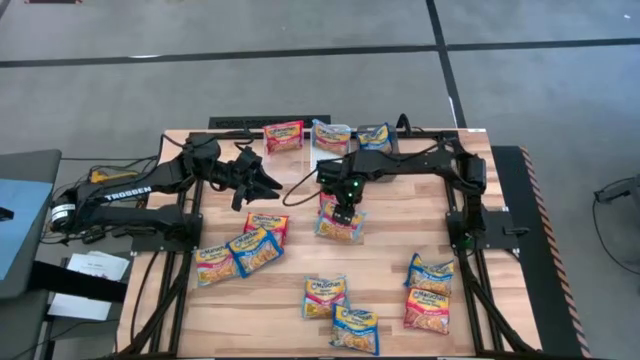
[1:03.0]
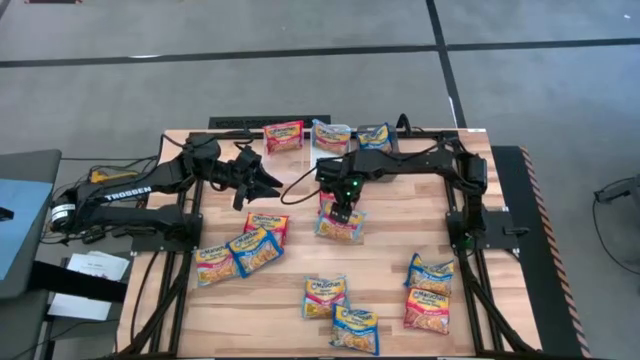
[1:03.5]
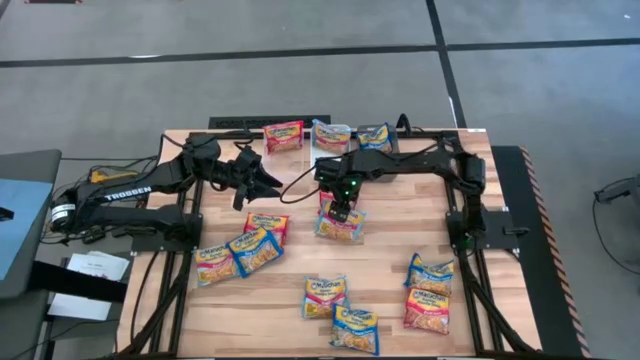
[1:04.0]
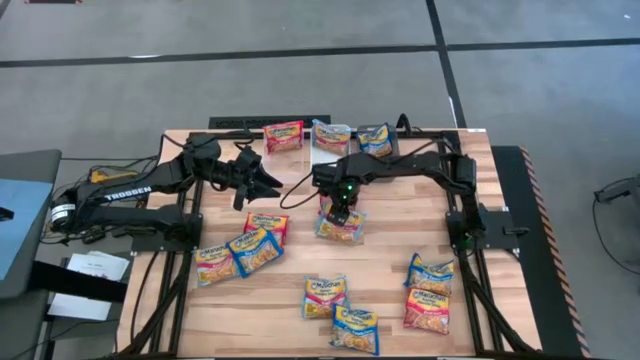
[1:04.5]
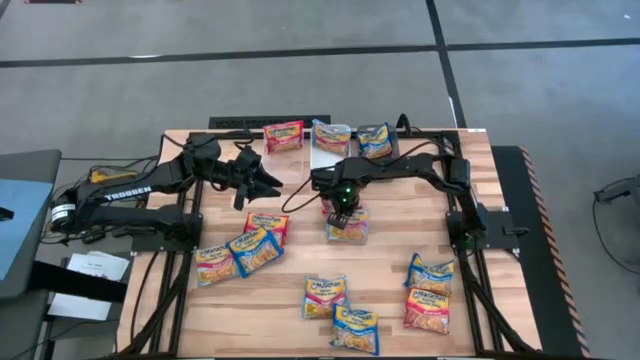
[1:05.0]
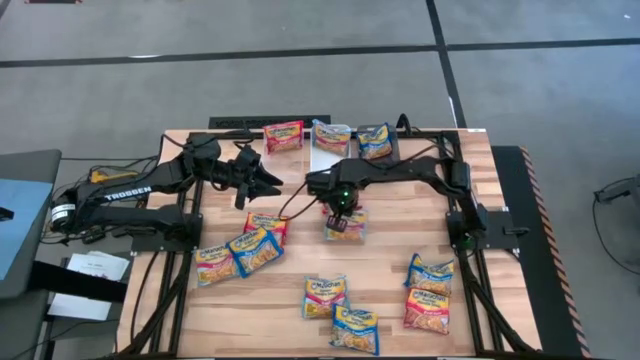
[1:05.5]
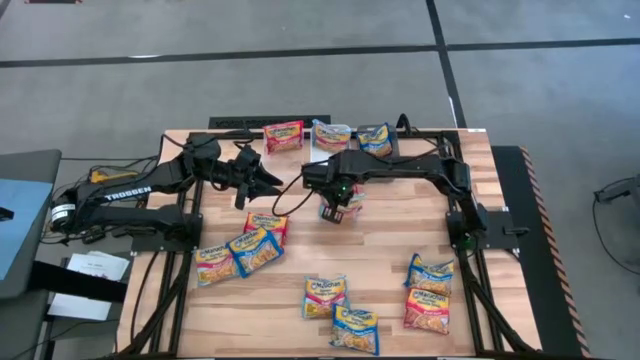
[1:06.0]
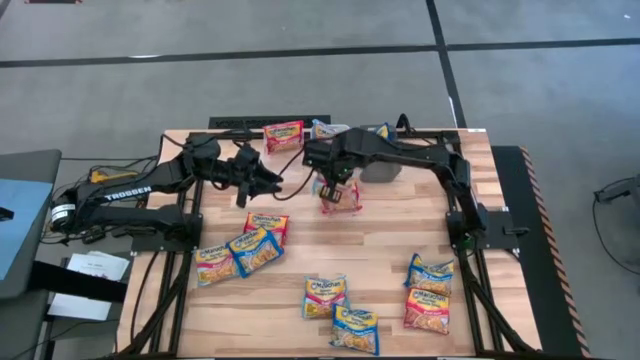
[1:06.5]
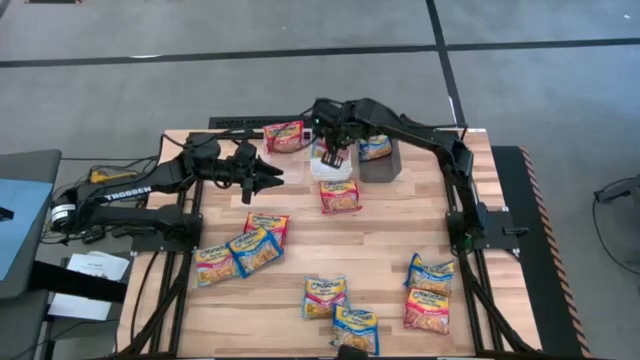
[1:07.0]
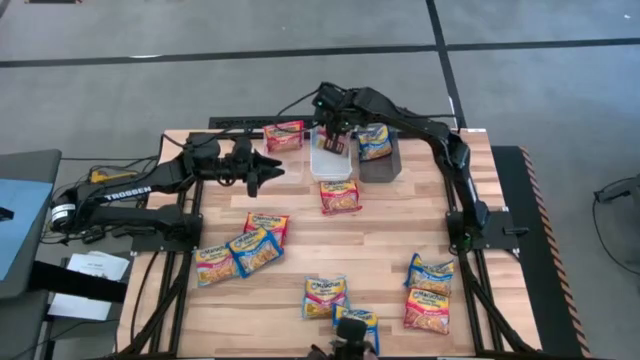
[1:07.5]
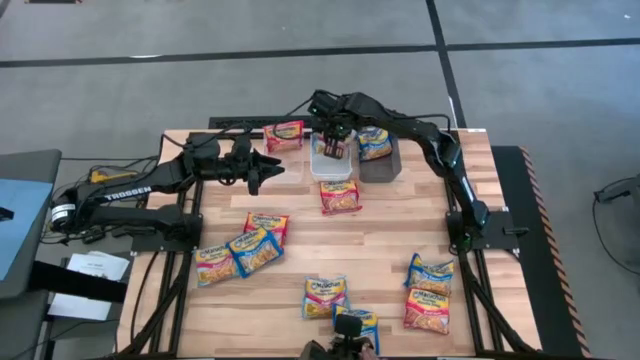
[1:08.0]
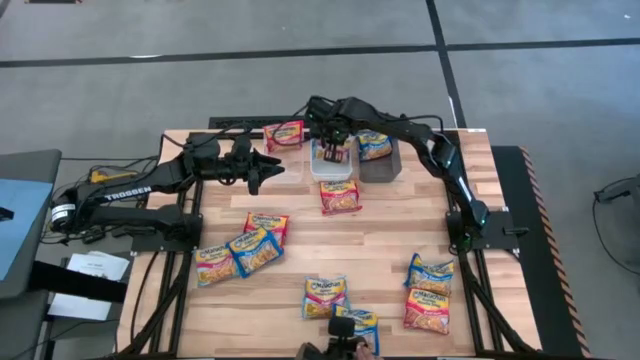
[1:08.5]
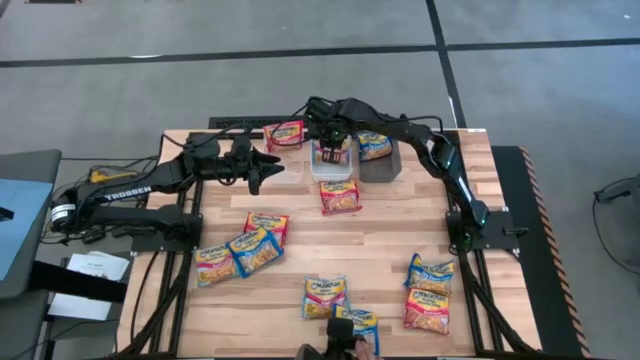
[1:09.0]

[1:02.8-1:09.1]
Task: Sort Maruchan noodles
Put the light blue noodle pack into the white bin

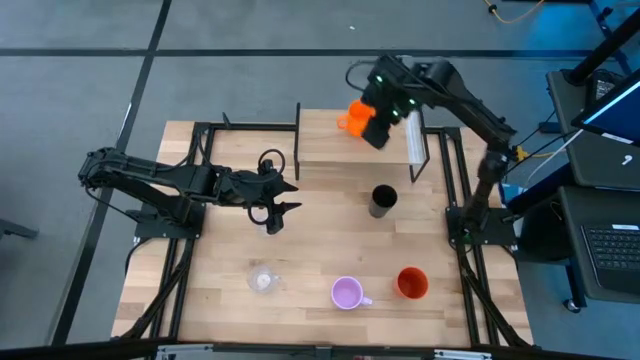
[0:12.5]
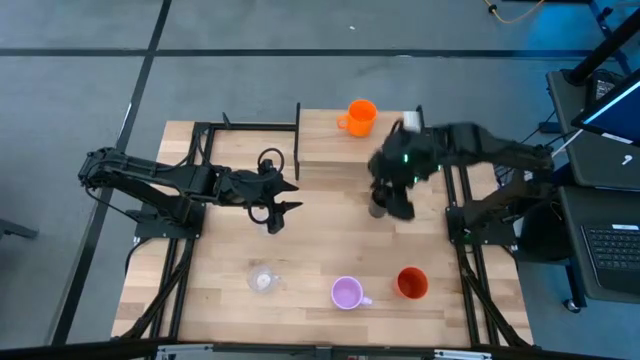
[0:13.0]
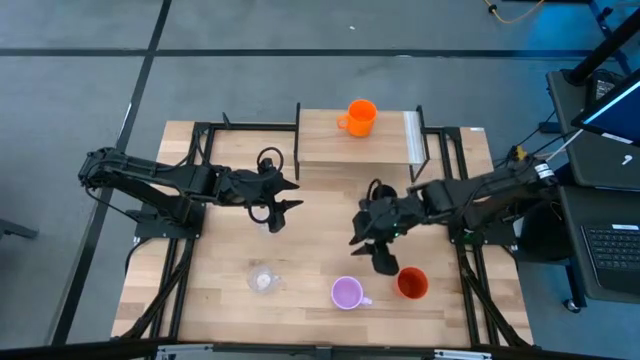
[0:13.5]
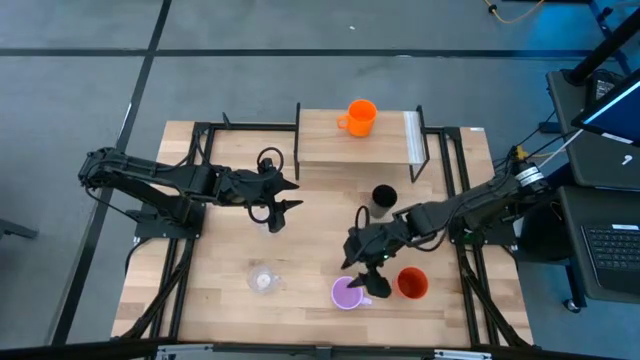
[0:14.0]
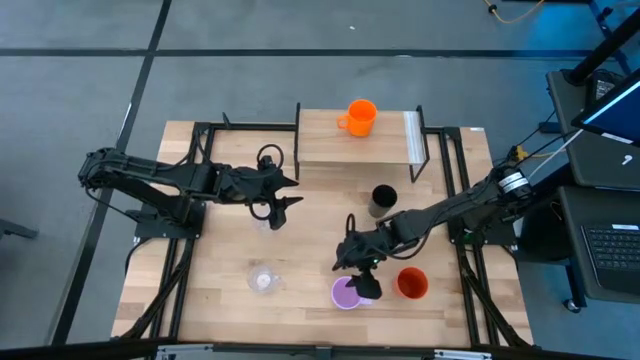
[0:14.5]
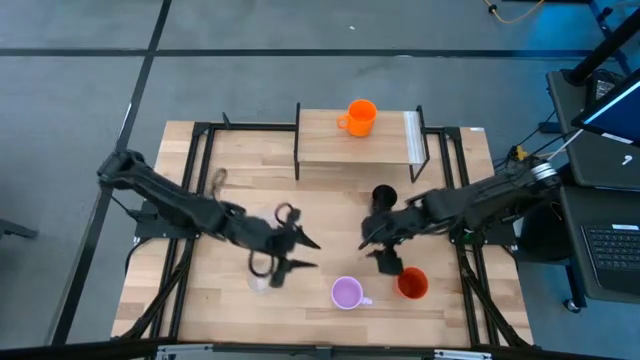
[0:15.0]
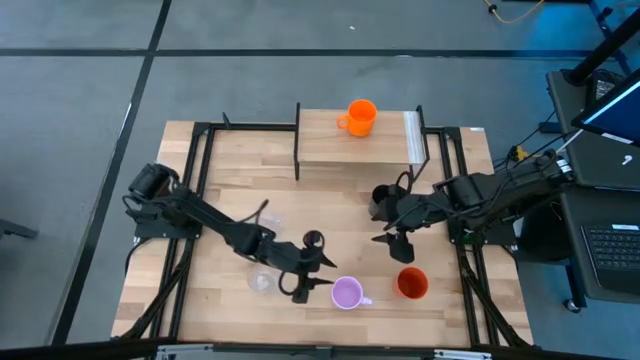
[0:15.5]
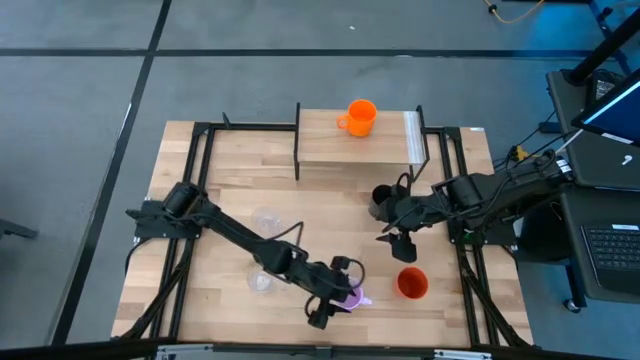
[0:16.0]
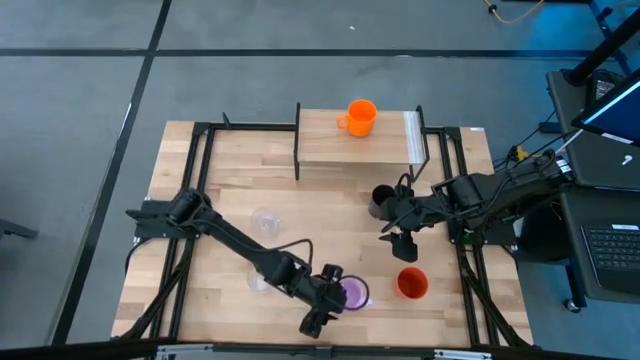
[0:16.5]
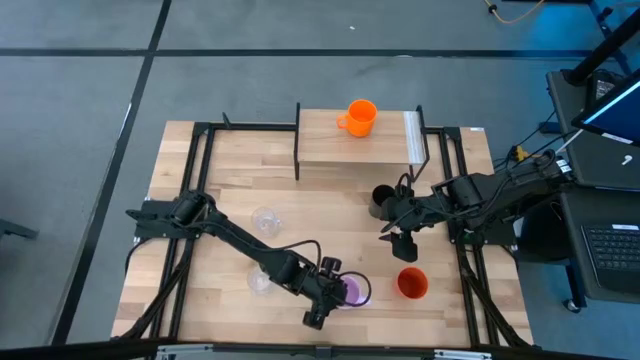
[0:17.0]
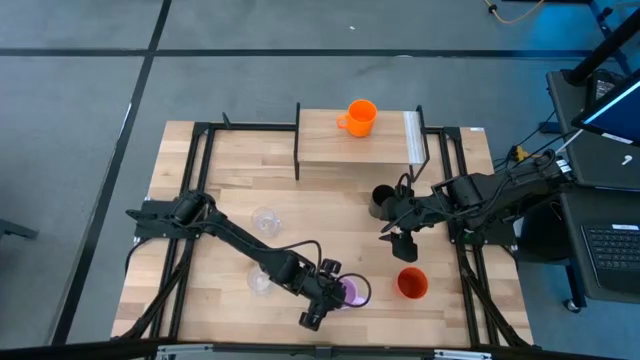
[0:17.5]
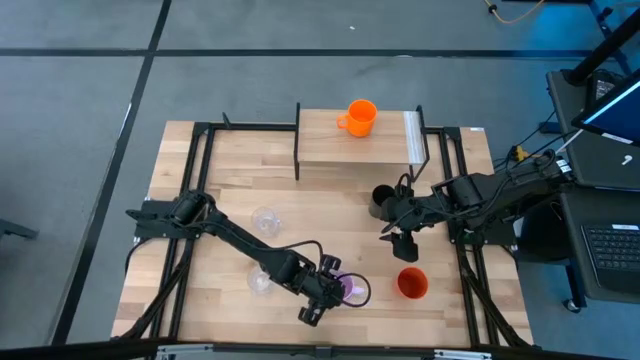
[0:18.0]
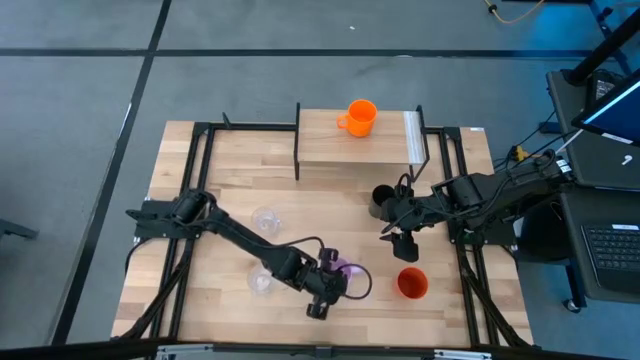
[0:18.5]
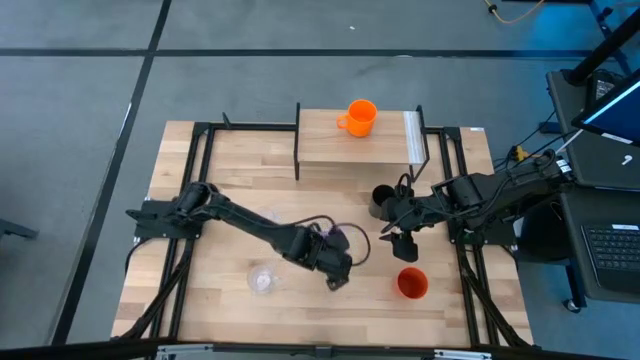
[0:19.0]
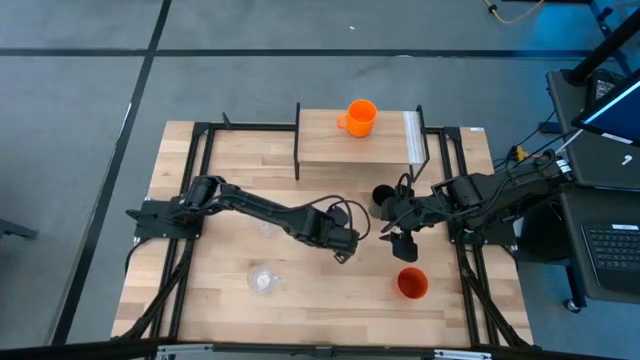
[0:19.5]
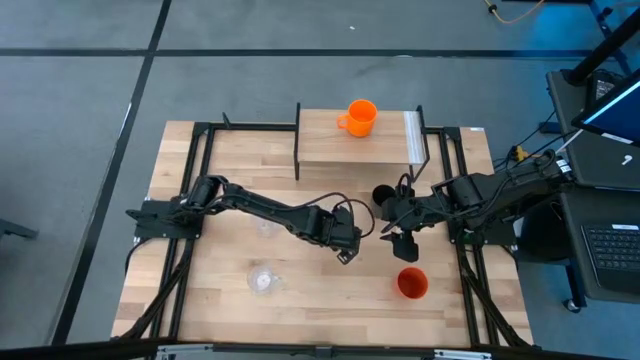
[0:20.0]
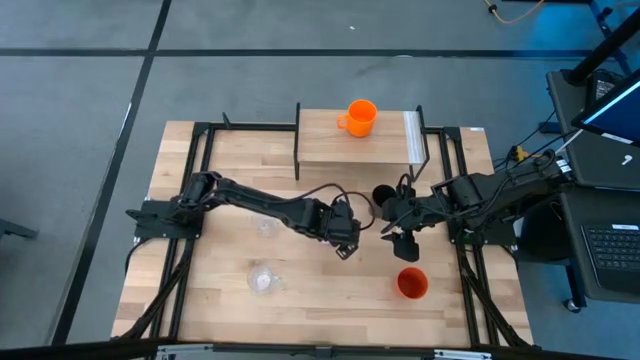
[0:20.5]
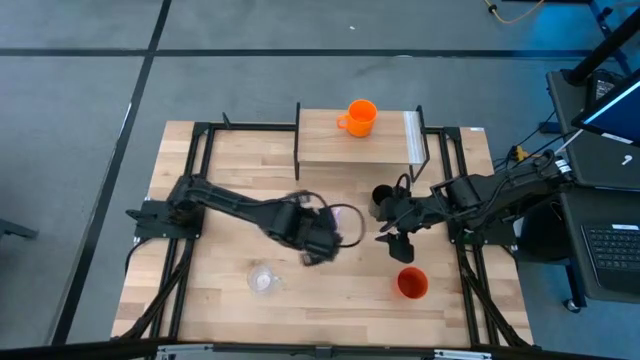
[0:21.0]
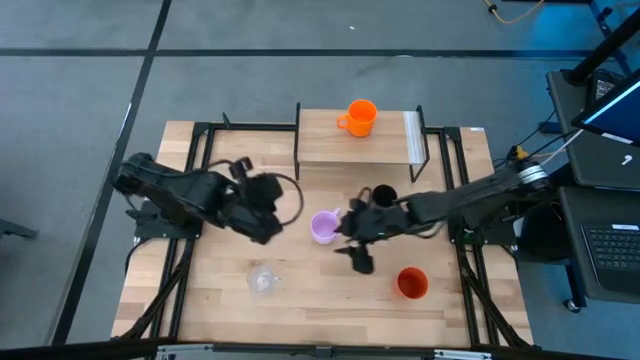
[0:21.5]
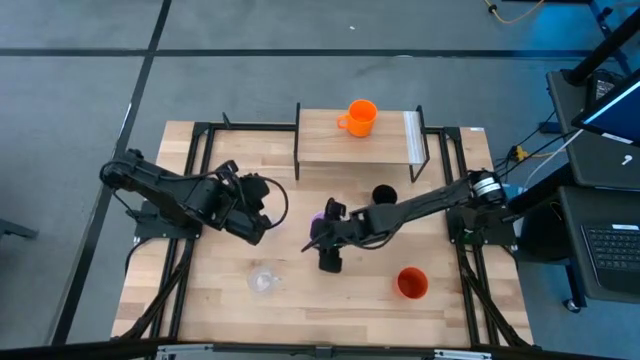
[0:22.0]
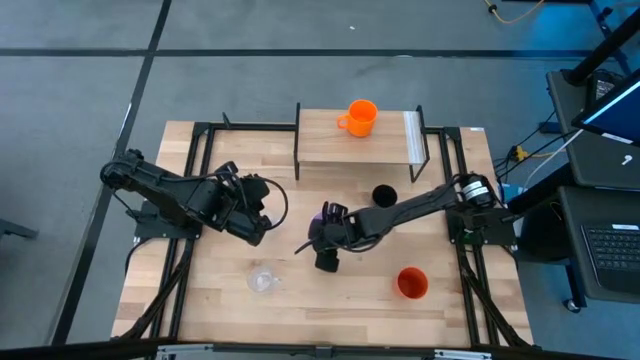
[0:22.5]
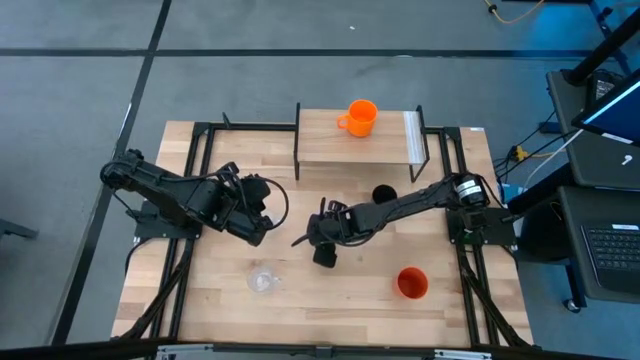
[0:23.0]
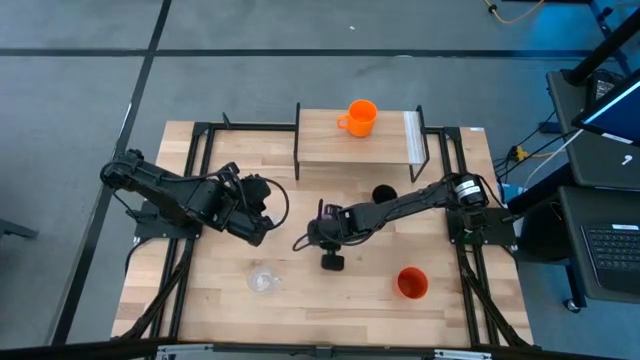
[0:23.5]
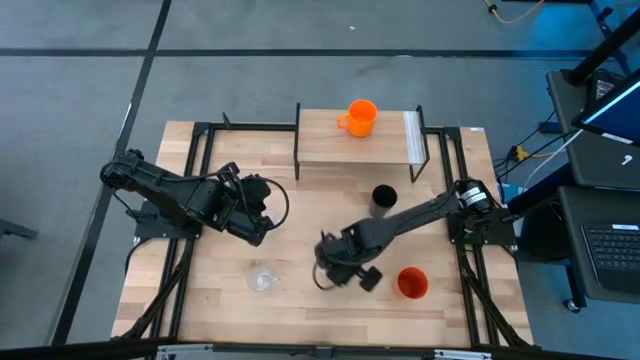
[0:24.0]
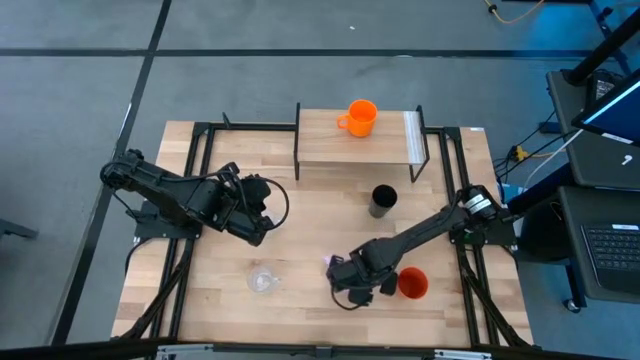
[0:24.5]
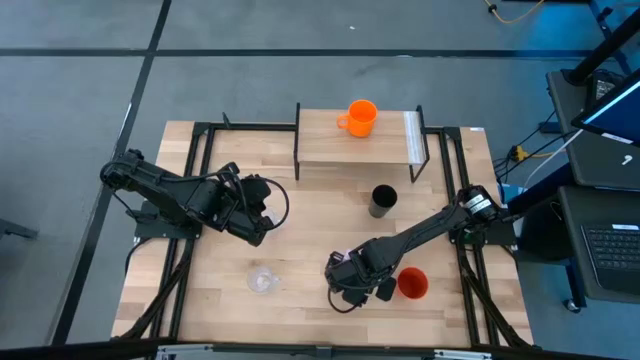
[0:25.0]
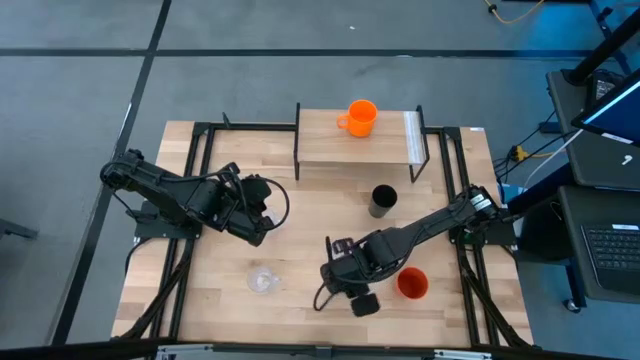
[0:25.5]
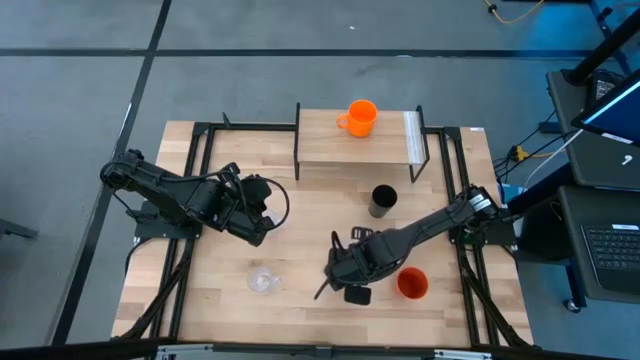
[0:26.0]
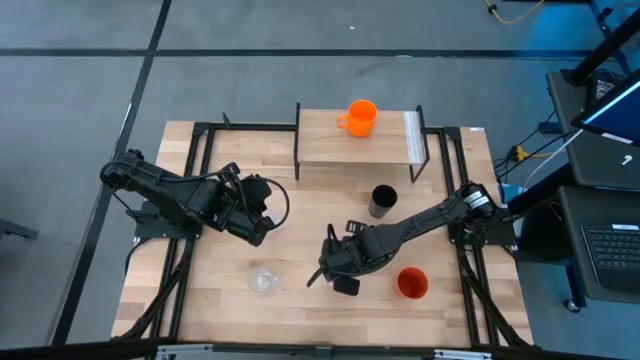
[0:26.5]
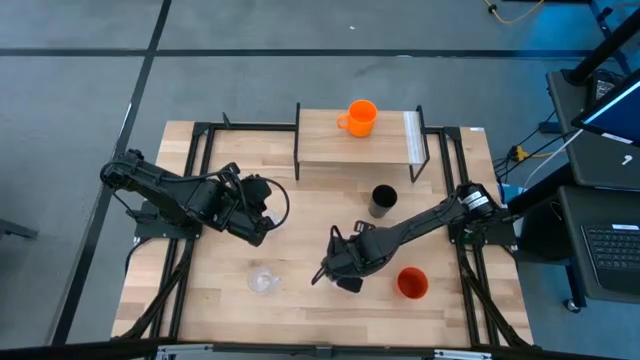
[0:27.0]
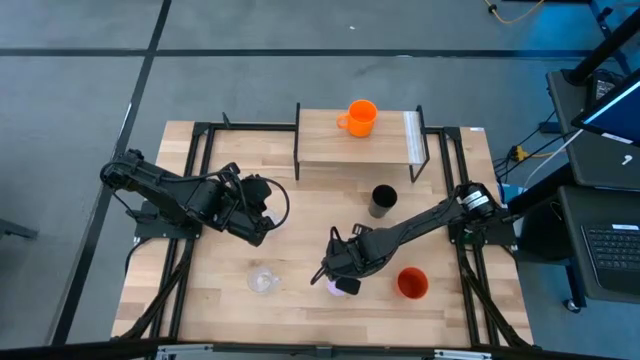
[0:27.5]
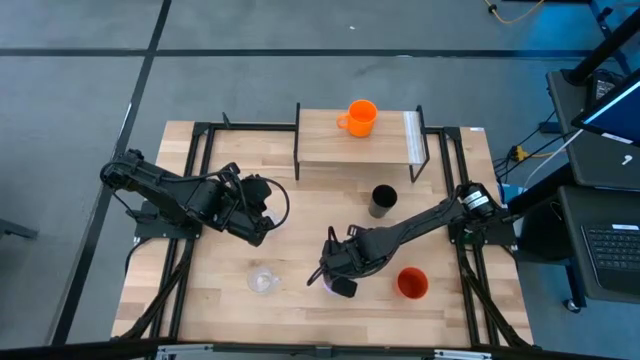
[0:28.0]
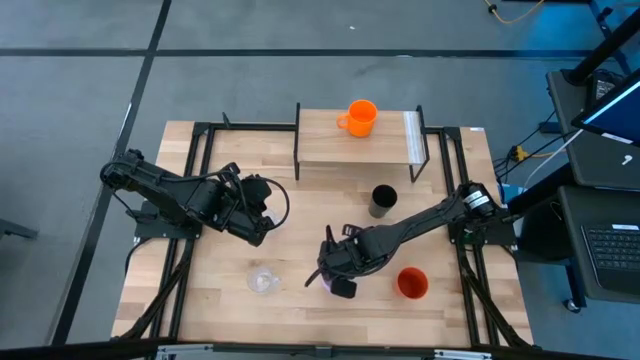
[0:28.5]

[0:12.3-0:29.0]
Task: Stack small to large cups/mugs on shelf
Put the purple mug on the shelf
